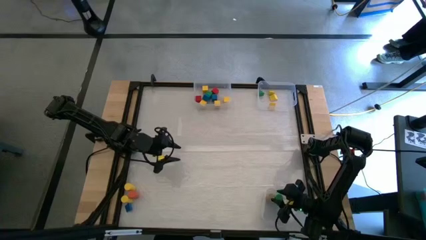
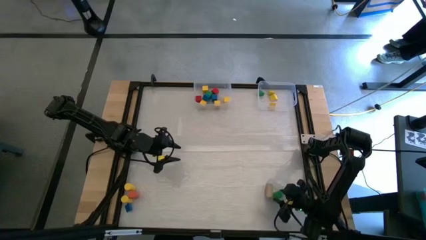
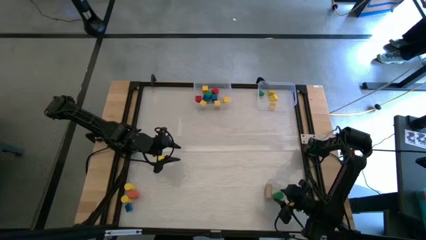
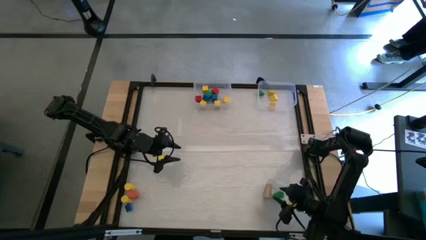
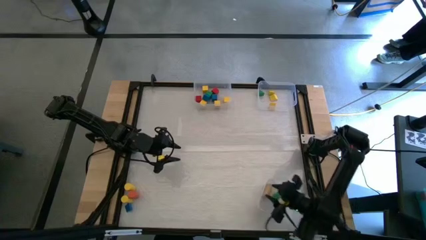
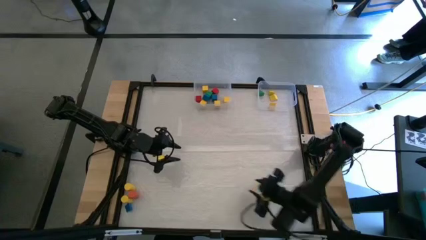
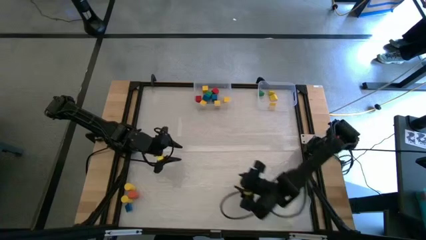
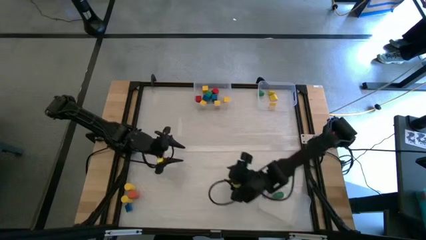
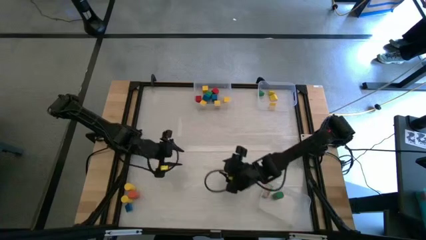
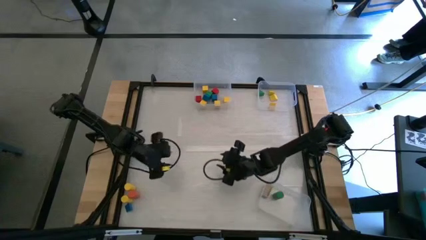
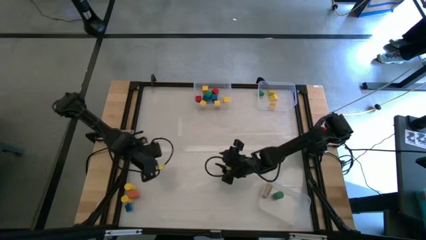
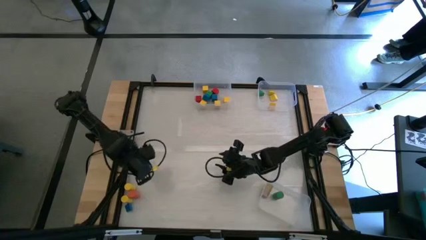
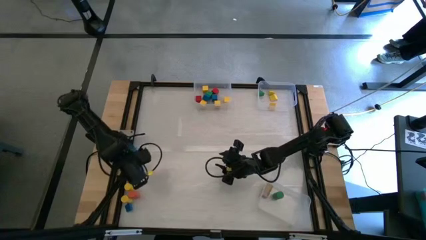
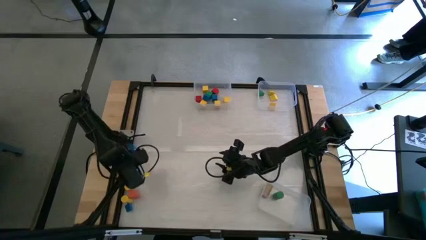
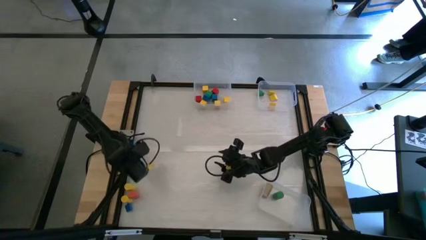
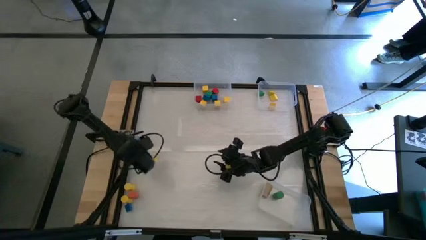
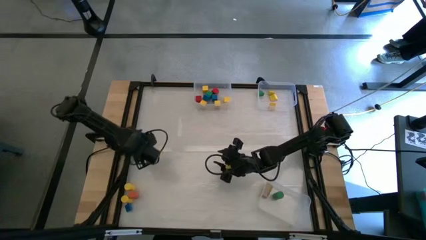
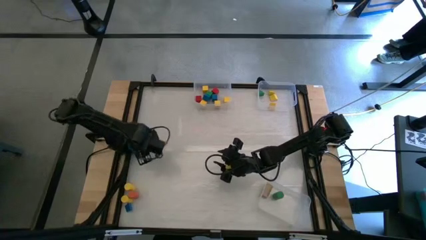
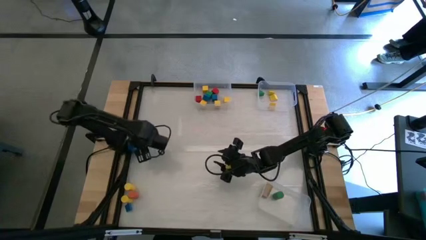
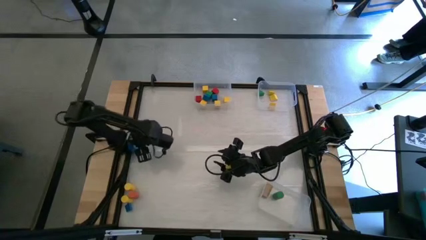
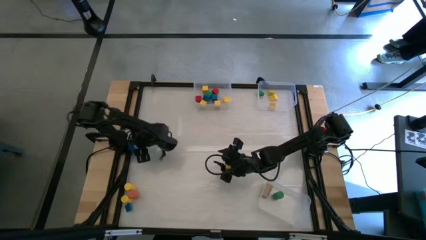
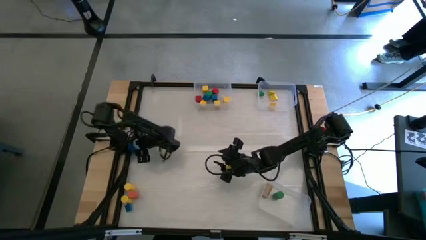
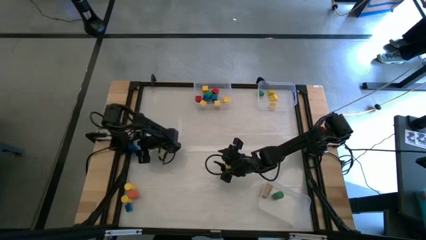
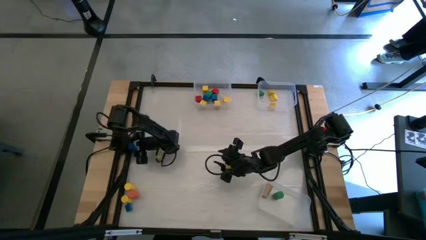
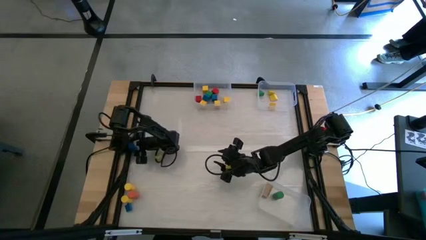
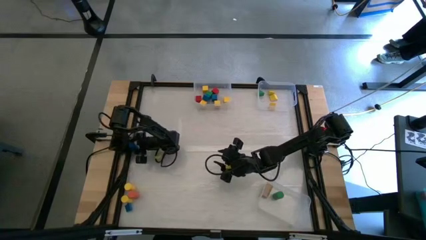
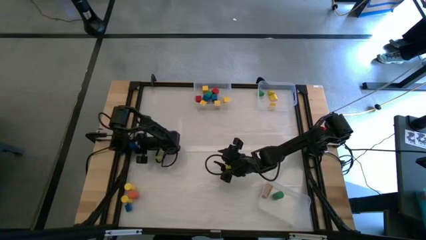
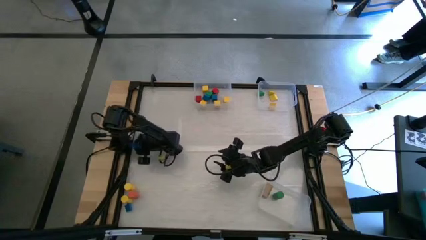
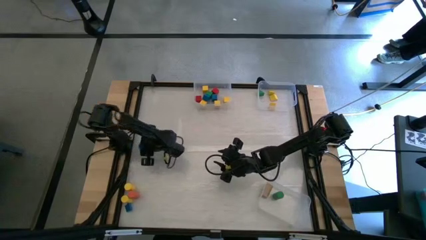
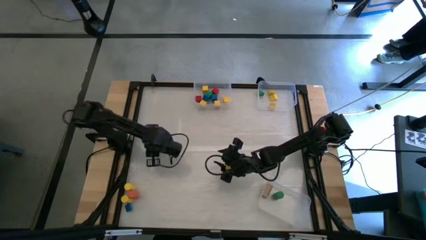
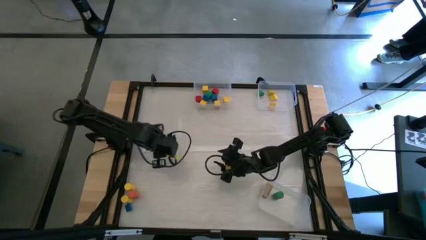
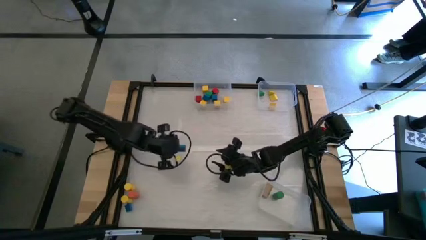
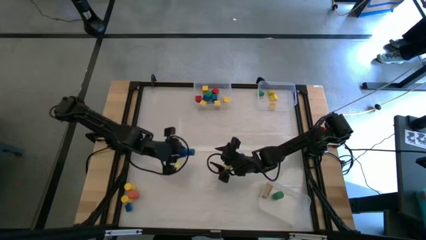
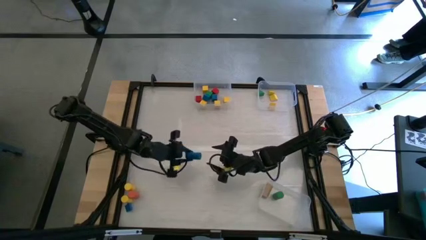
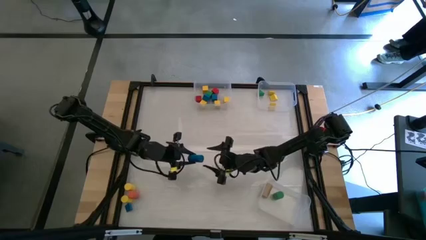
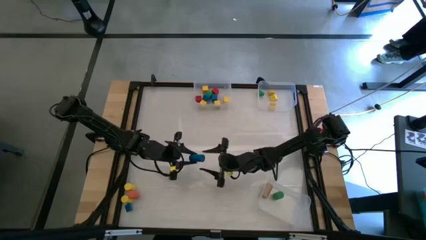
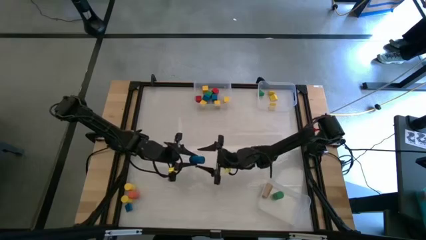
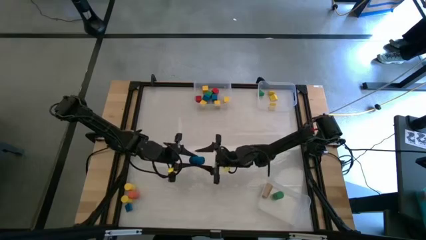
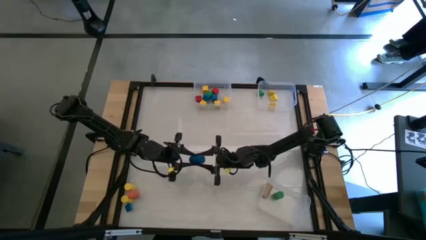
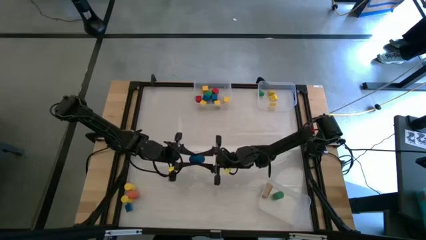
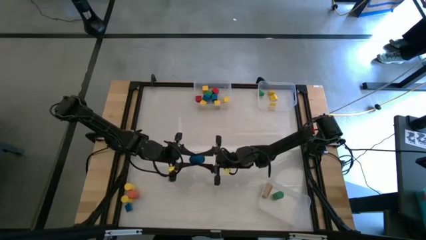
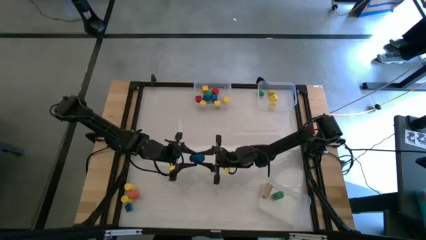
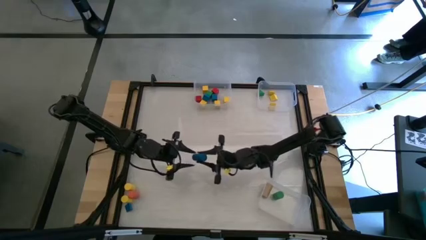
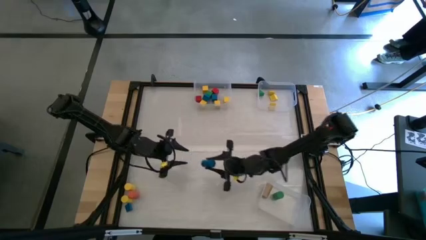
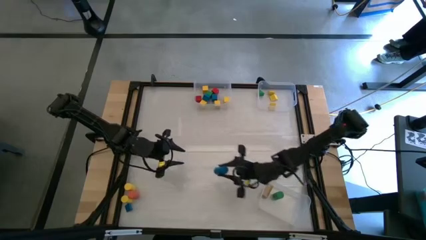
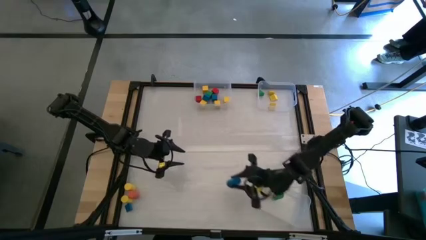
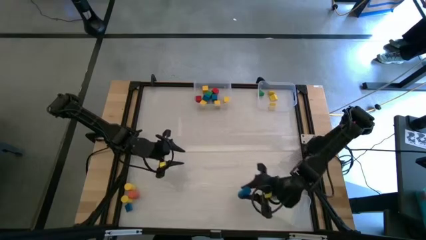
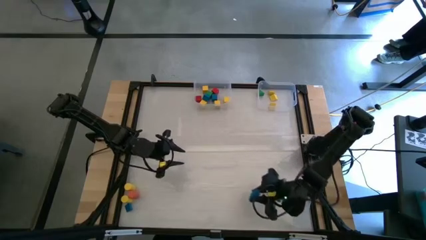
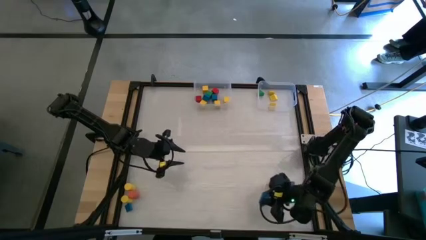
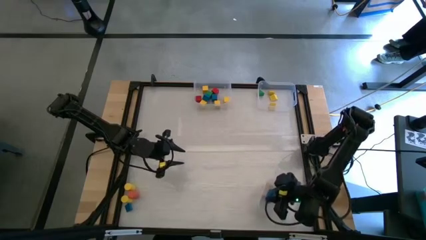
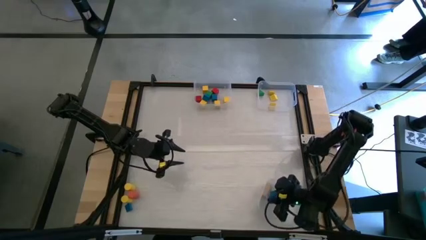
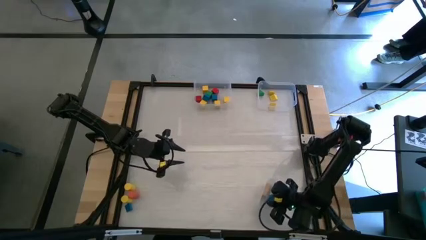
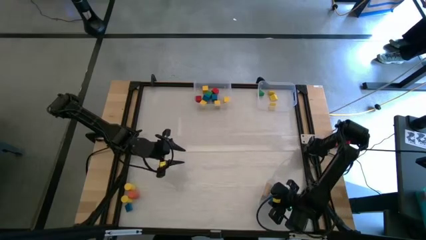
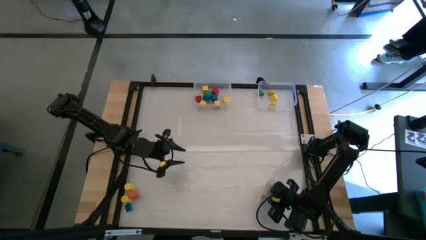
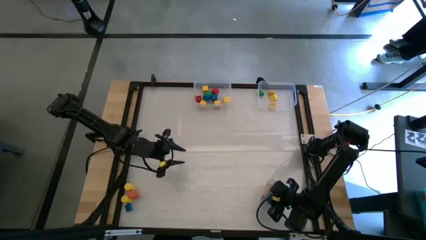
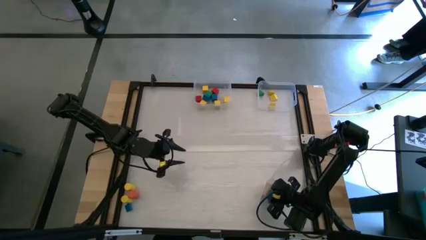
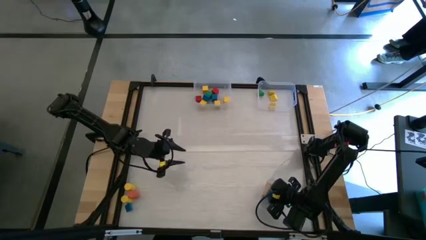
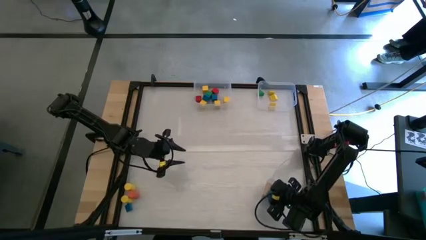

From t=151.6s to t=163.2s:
Task: Sort blocks by size
Put the cylinder blue block into the bottom right transparent bin

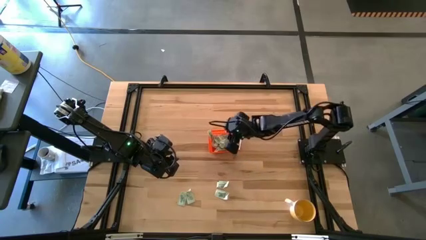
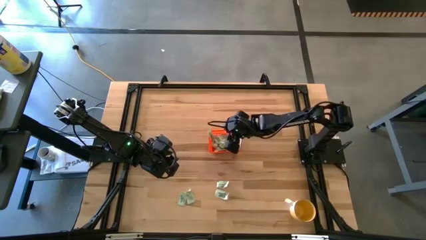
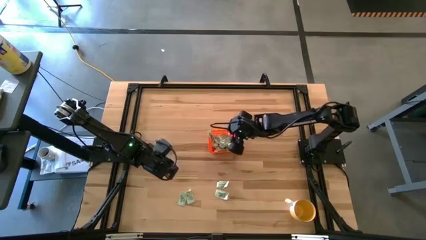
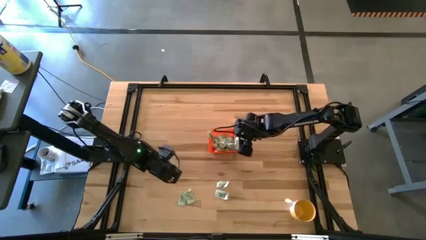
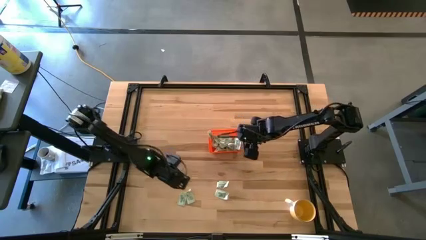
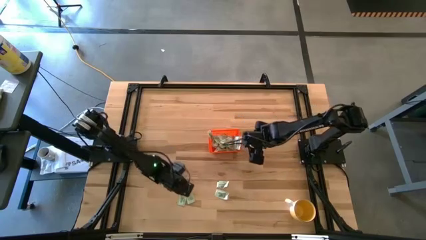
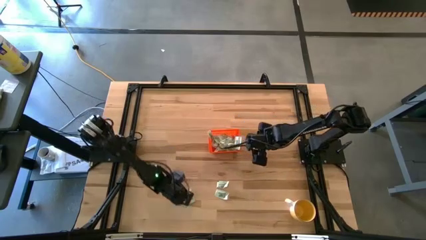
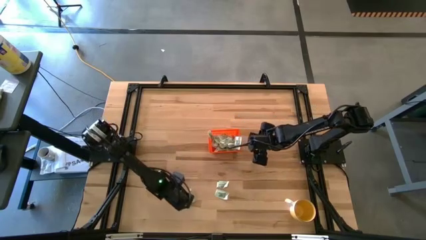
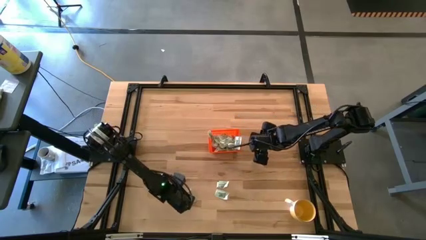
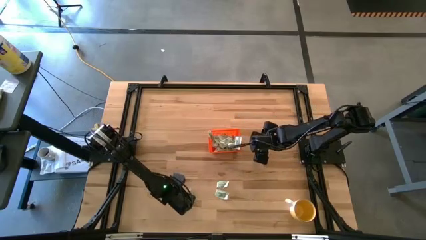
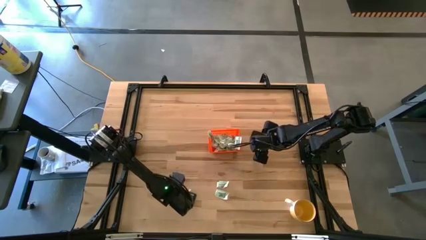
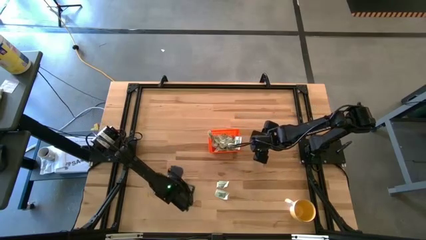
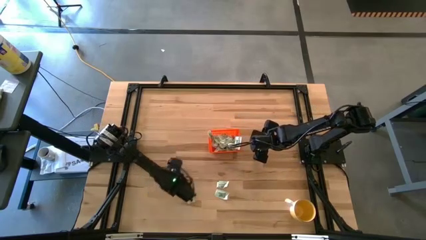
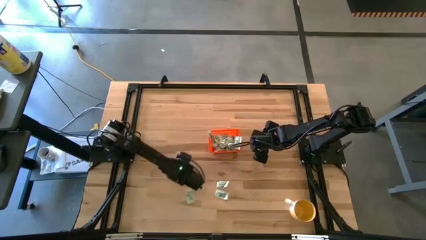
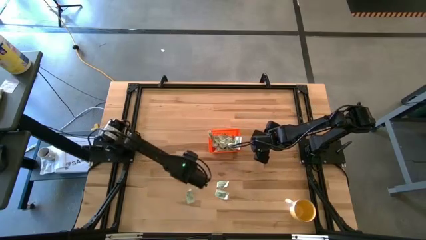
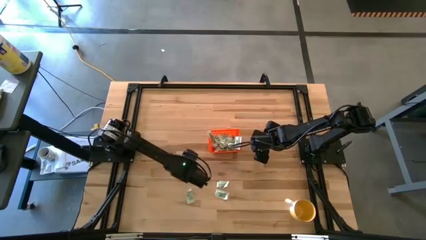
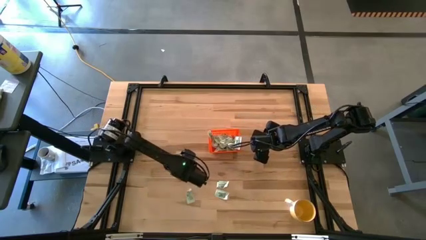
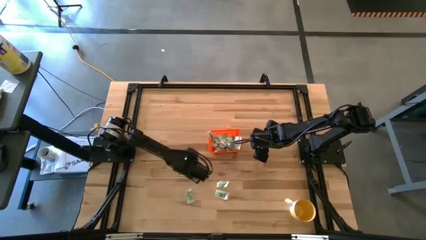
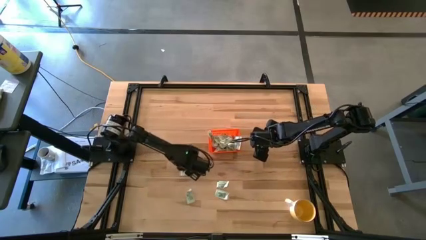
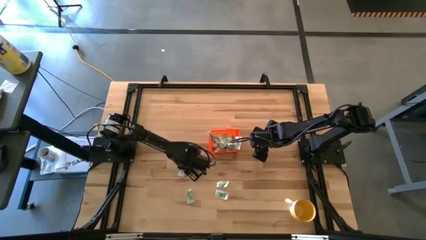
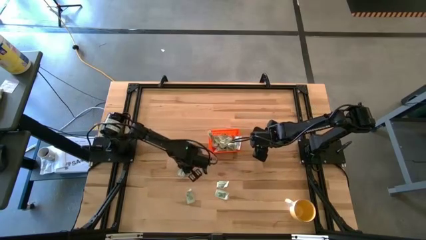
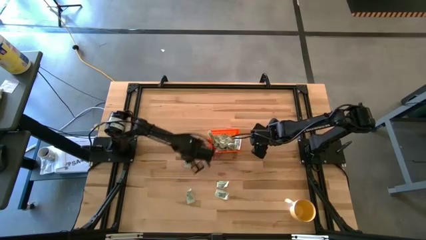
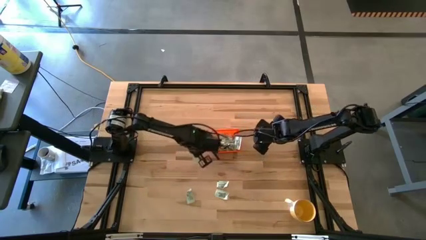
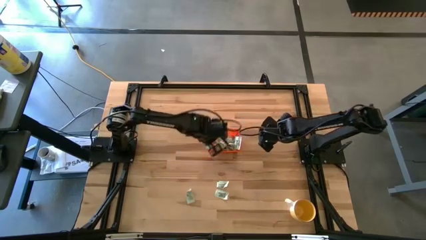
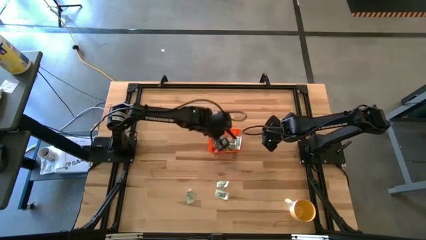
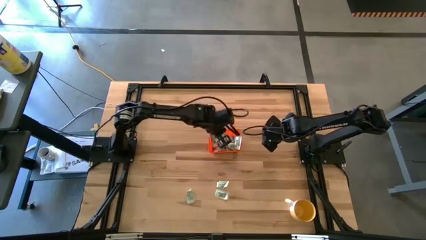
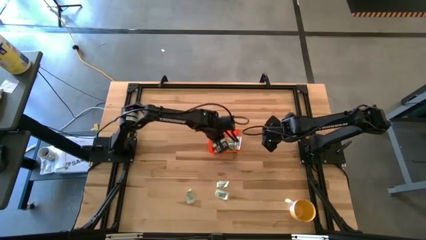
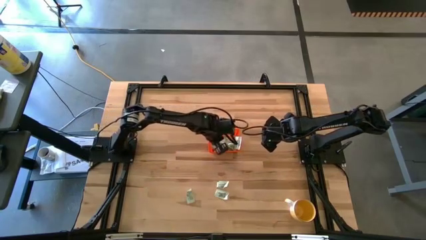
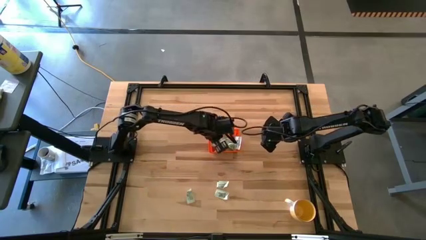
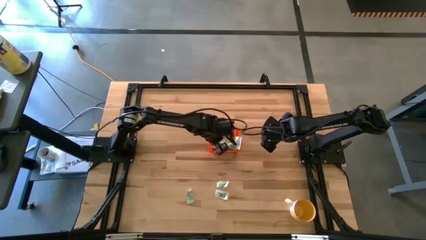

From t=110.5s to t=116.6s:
Task: Pick and place Stevia / Truvia into bins
Put the light green stevia packet into the orange basket
